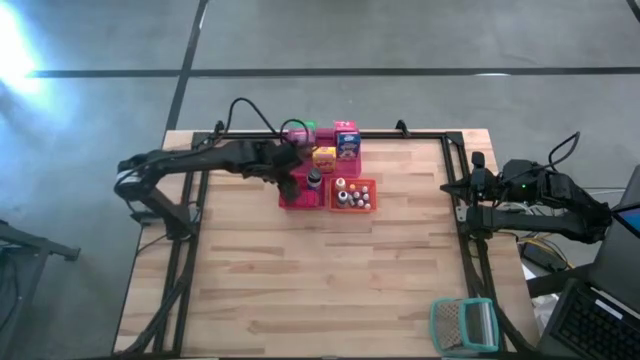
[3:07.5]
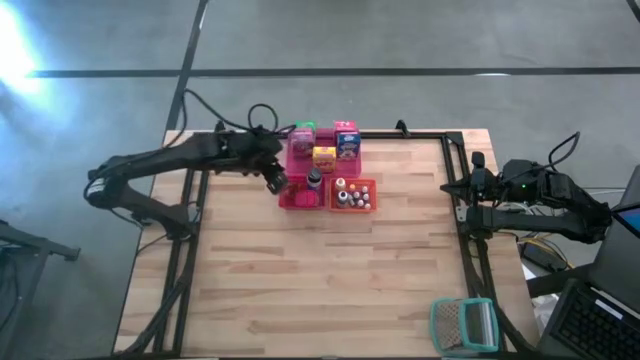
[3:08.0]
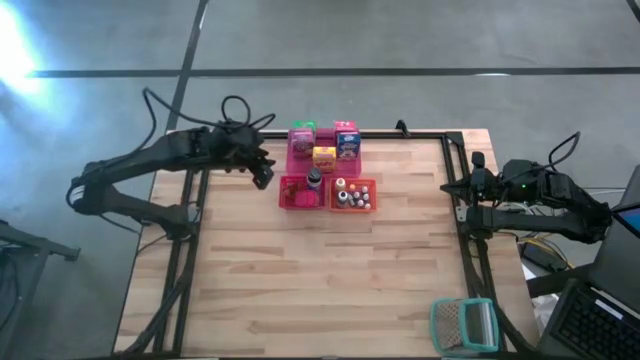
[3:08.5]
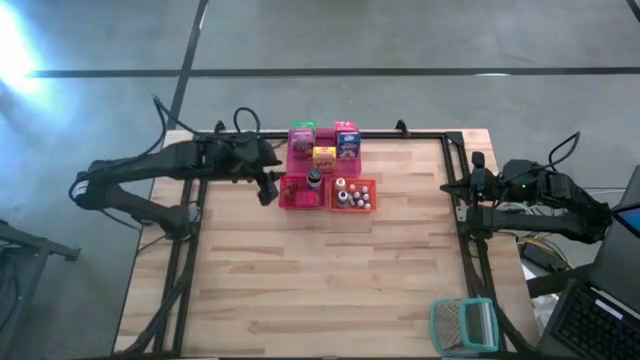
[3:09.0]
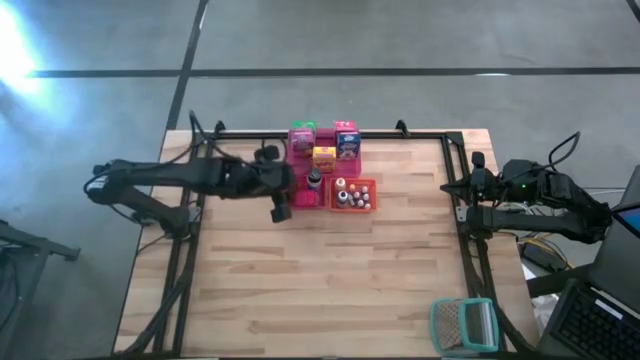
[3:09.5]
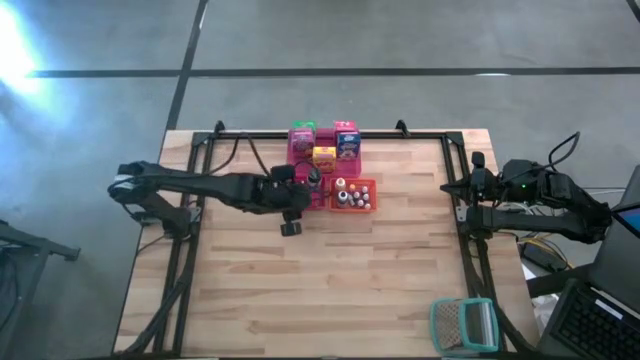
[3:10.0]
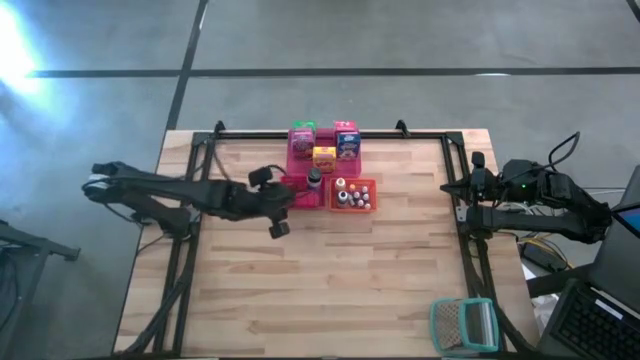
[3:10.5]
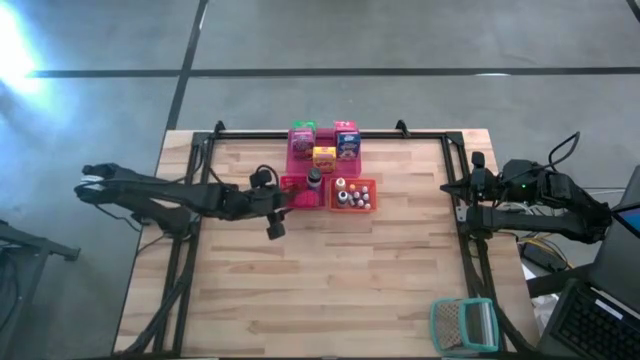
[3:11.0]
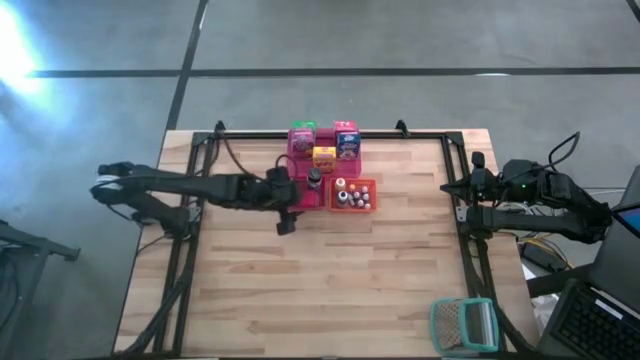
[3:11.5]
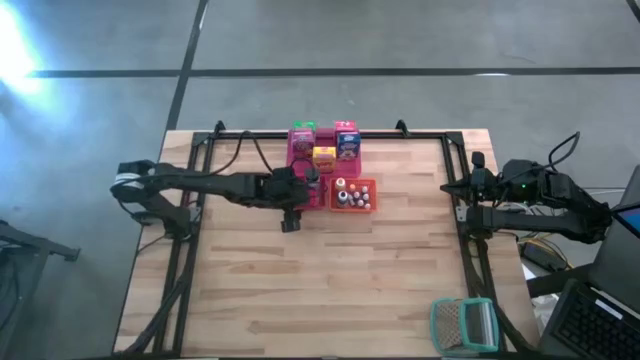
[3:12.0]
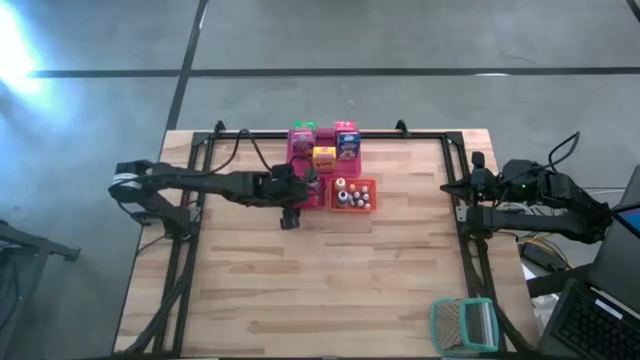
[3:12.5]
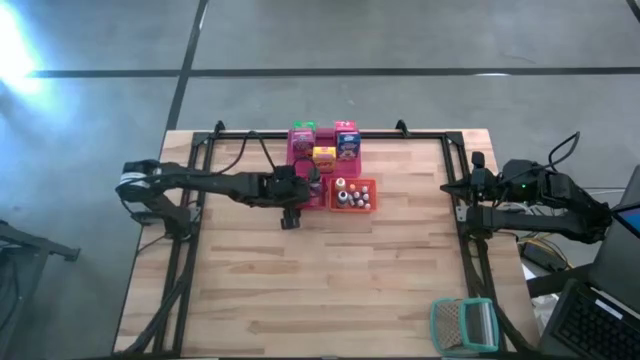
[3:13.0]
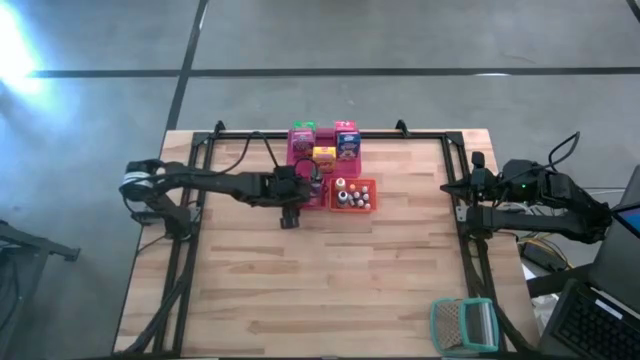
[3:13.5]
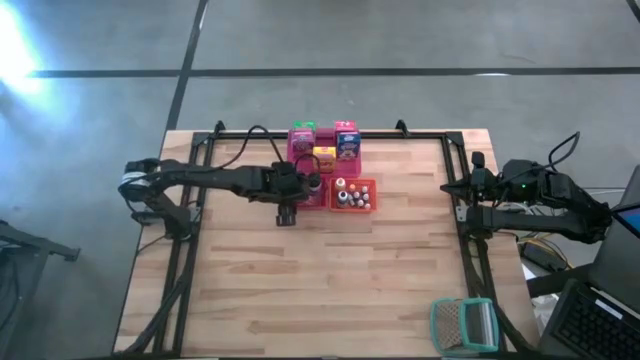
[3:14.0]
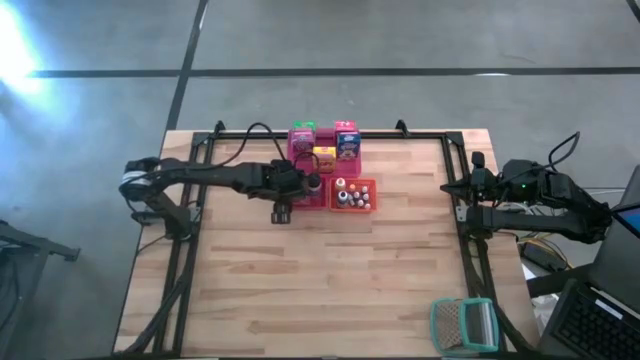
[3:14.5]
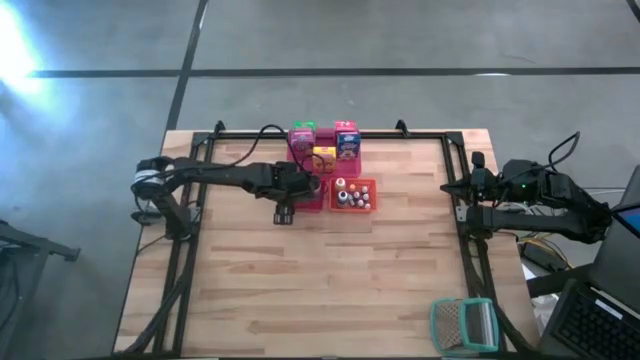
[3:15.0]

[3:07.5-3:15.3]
Task: Pick & Place Kitchen Items
Adjust the red seasoning can in the red bin

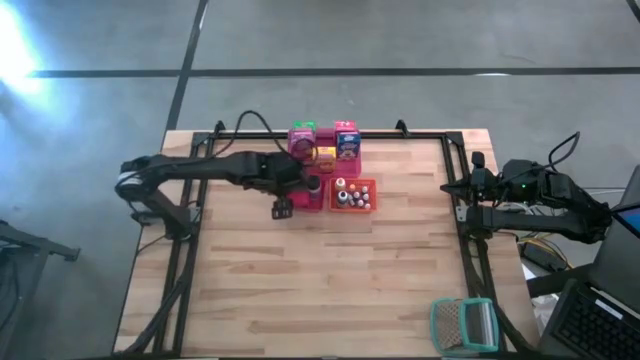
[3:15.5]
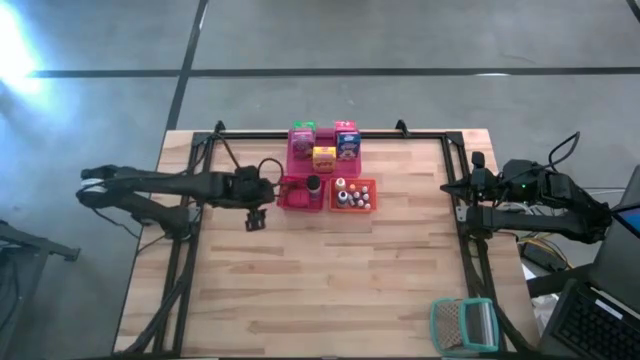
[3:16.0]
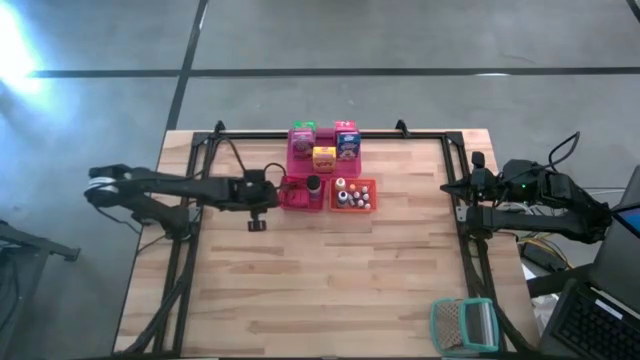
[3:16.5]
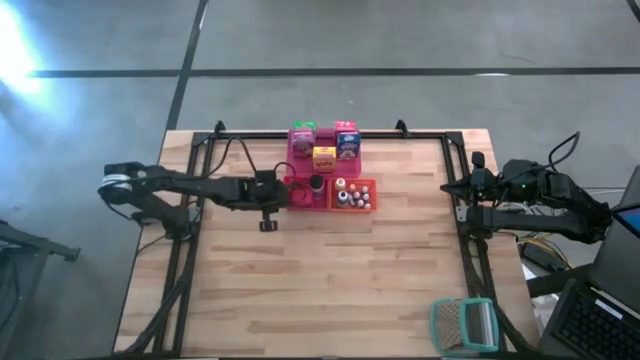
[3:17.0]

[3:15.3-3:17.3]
Adjust the red bin on the table

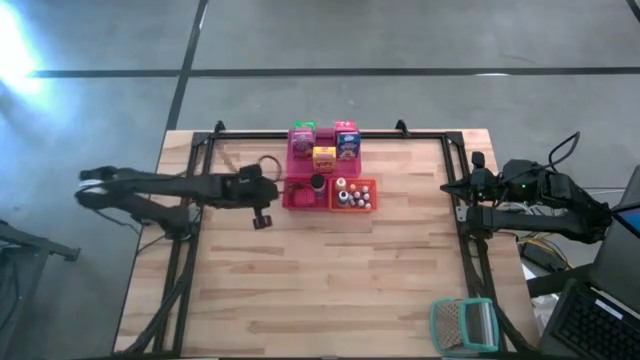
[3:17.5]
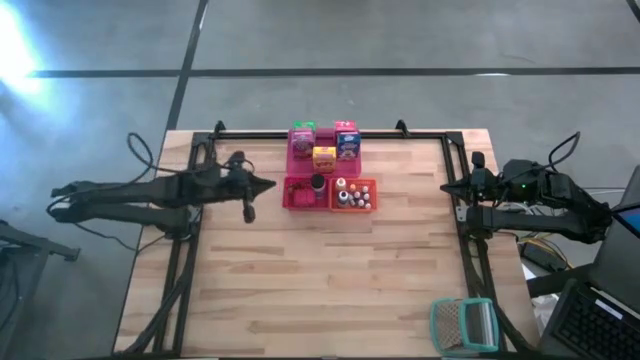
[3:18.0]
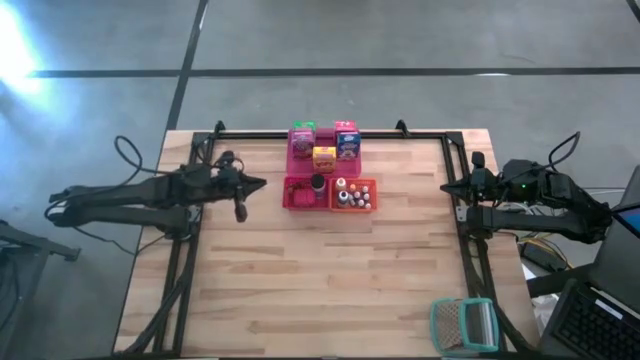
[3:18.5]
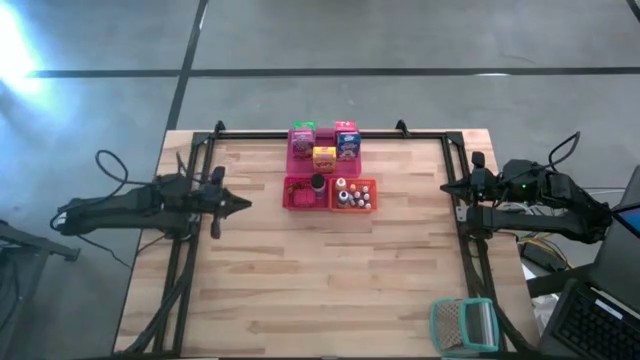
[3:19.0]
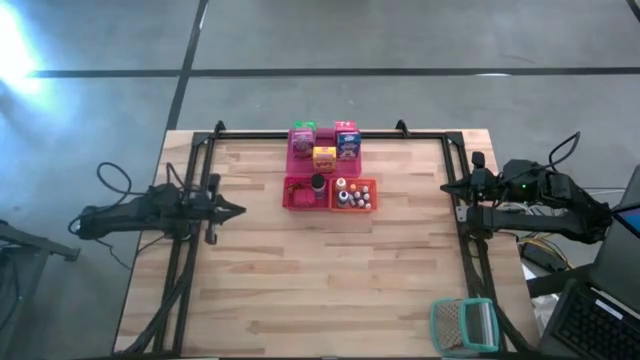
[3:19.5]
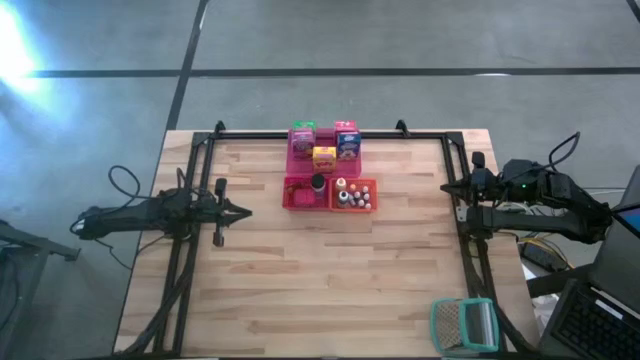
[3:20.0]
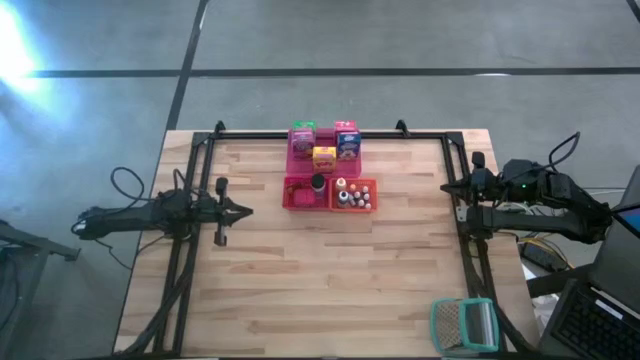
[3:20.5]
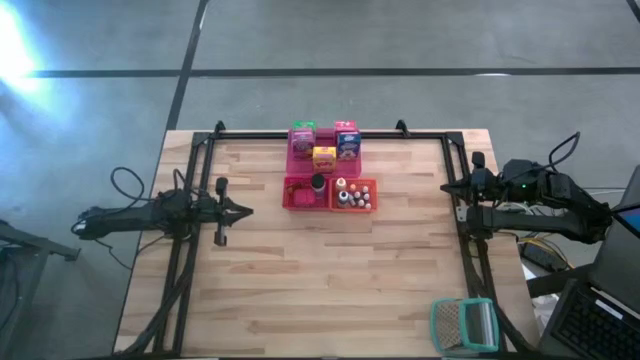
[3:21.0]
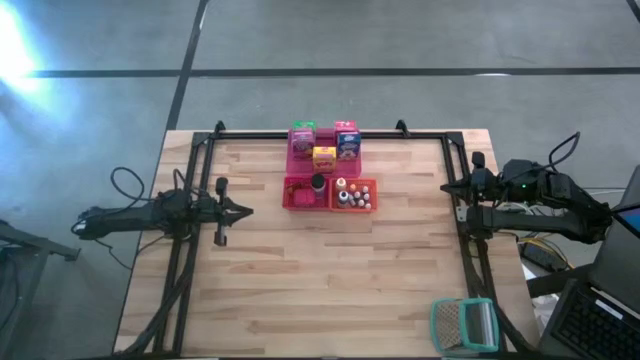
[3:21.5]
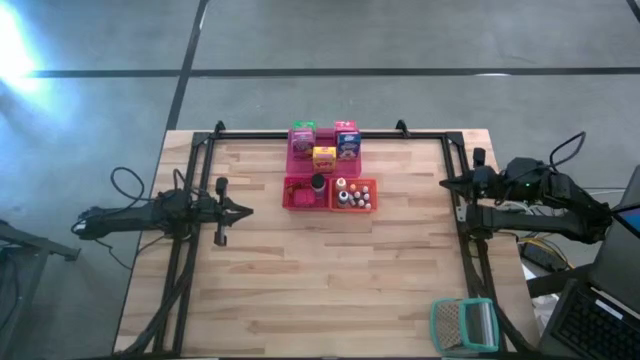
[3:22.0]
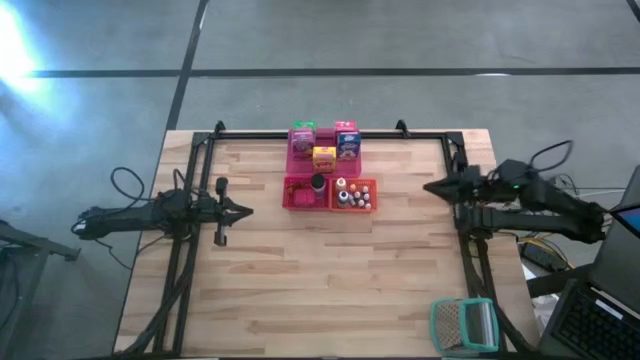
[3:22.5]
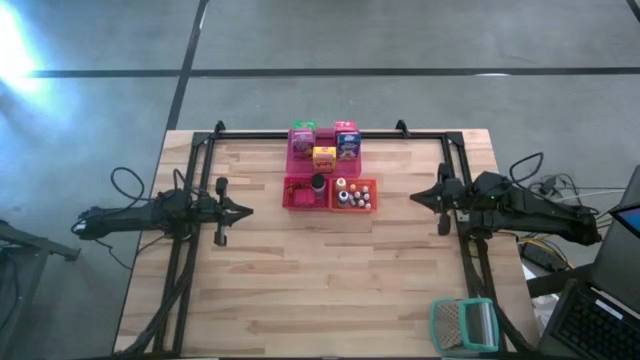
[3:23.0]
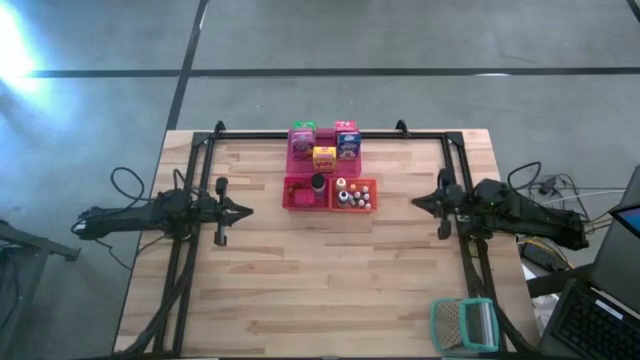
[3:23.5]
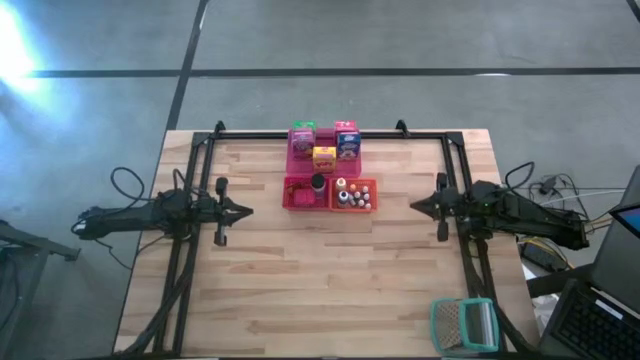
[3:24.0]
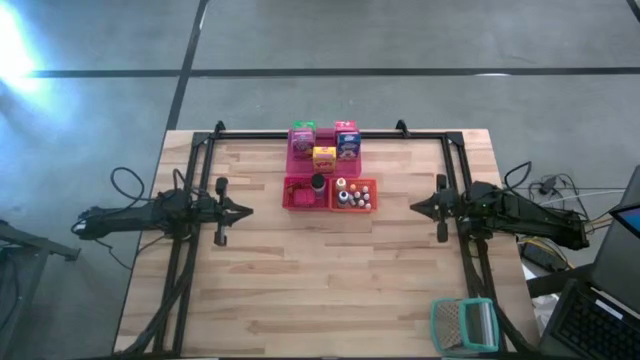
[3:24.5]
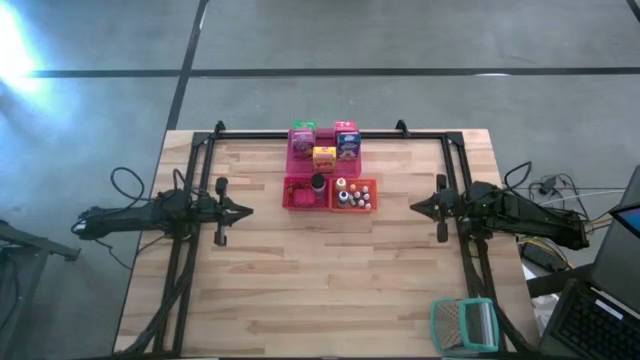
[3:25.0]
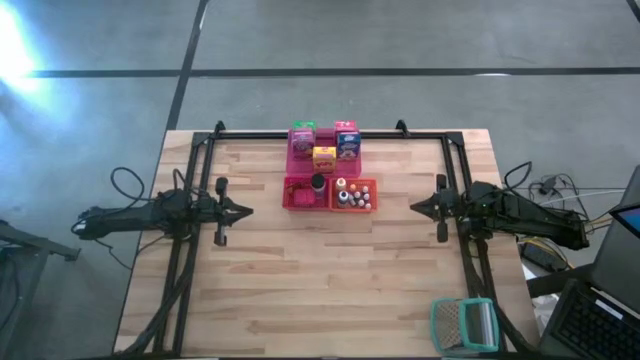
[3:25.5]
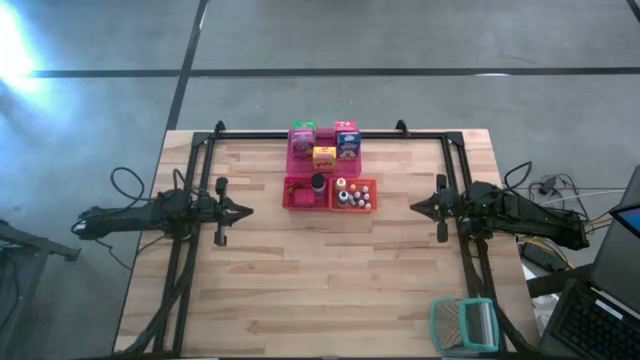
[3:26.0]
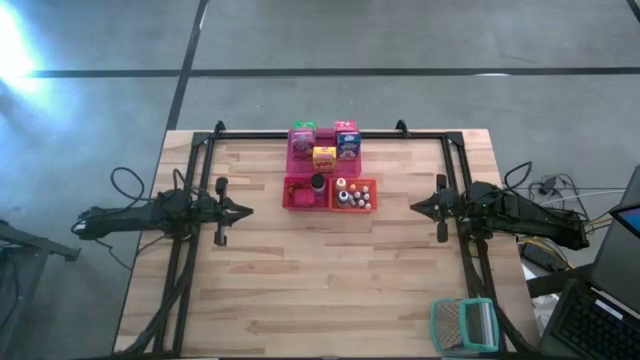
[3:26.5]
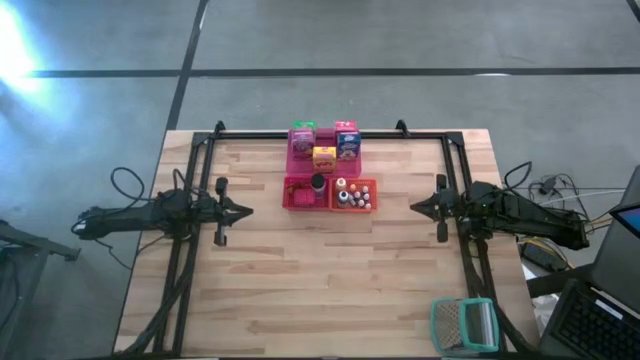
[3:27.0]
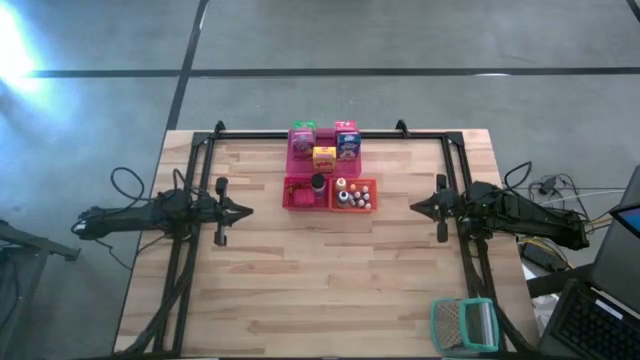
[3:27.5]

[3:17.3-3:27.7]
Return to Home Position

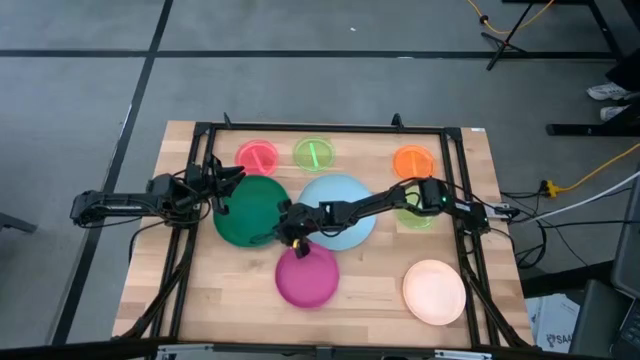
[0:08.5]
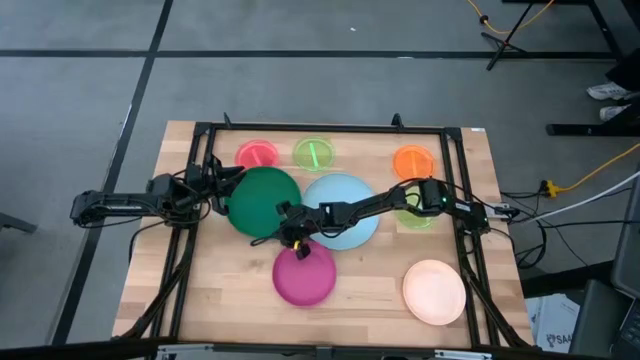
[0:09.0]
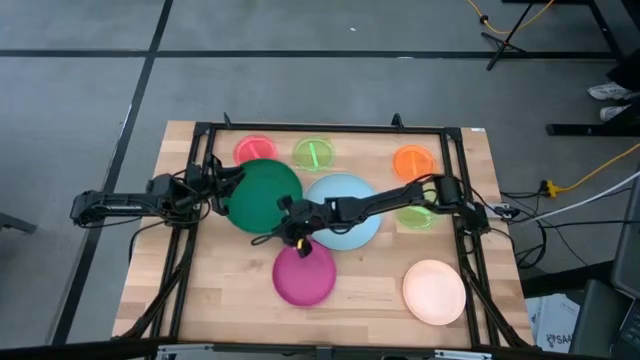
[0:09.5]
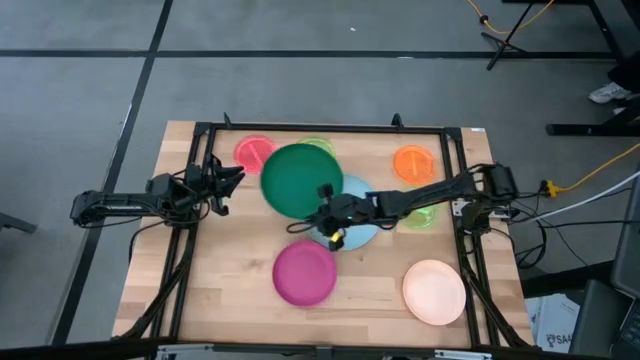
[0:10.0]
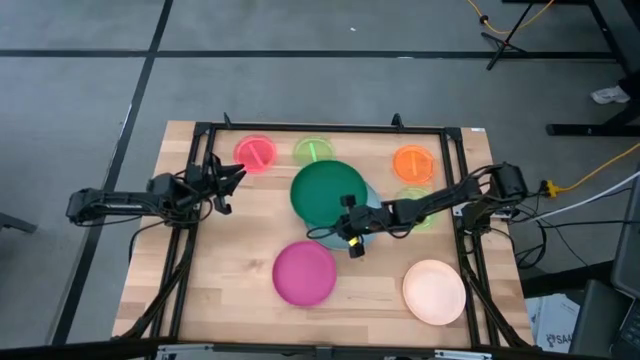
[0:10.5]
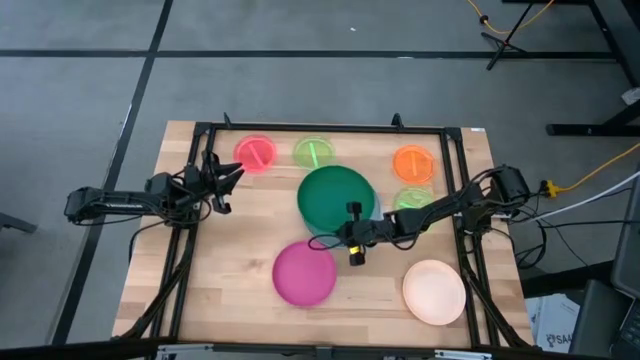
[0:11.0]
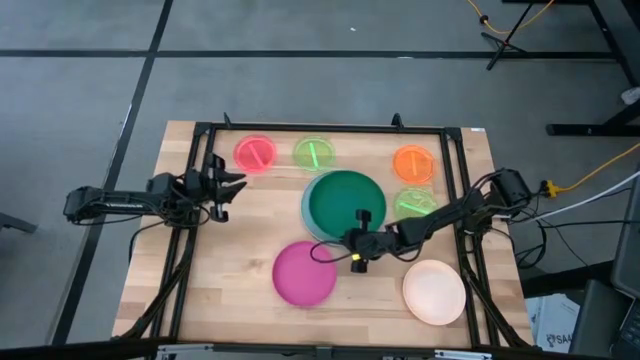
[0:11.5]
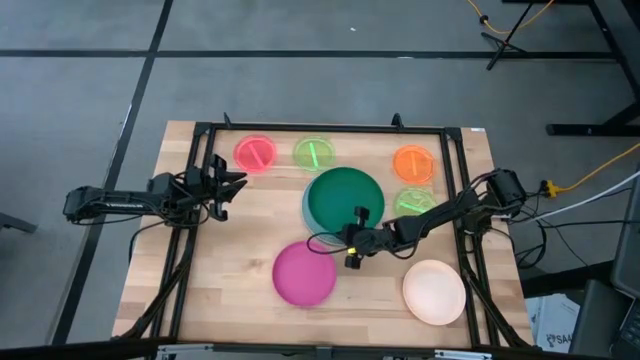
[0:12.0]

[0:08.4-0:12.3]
Task: Stack plastic plates
Stack the green plate on the light blue plate
